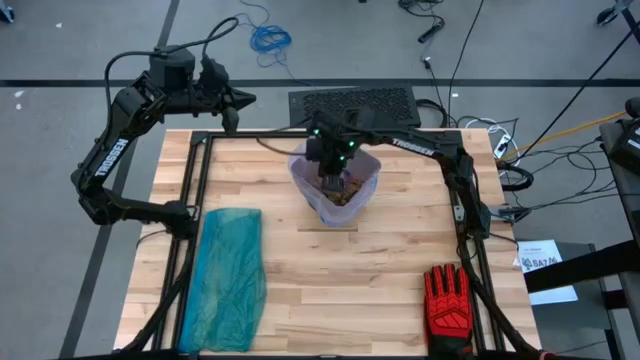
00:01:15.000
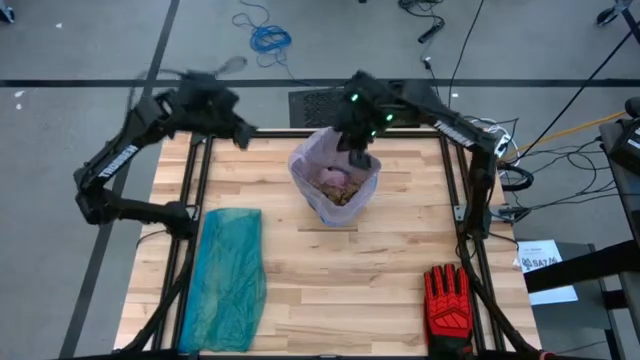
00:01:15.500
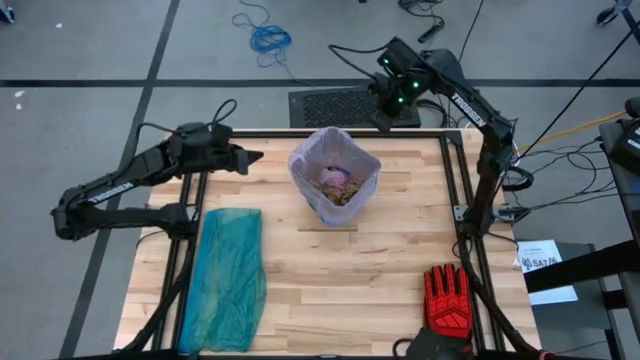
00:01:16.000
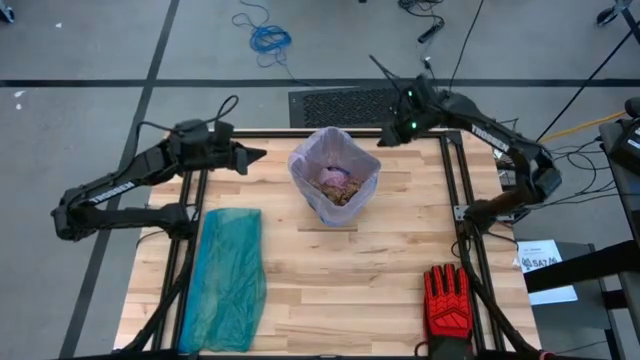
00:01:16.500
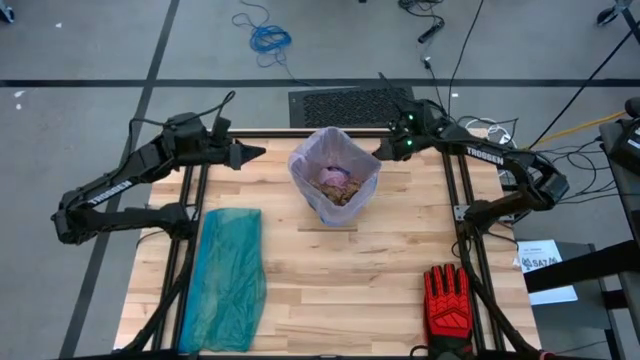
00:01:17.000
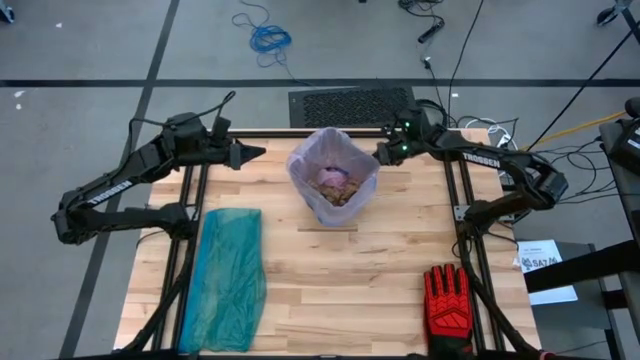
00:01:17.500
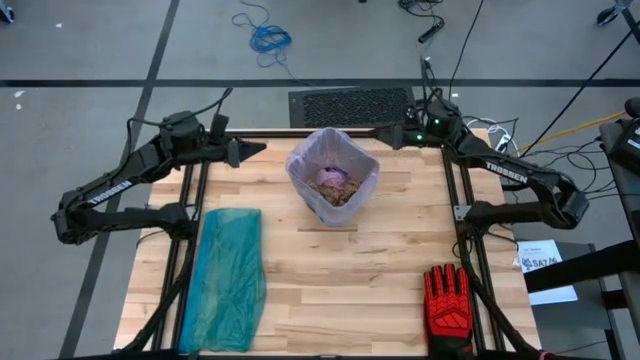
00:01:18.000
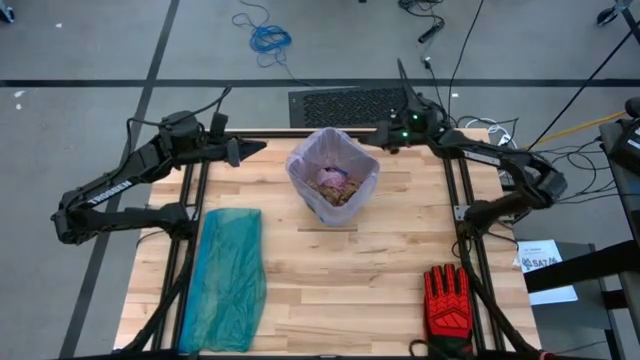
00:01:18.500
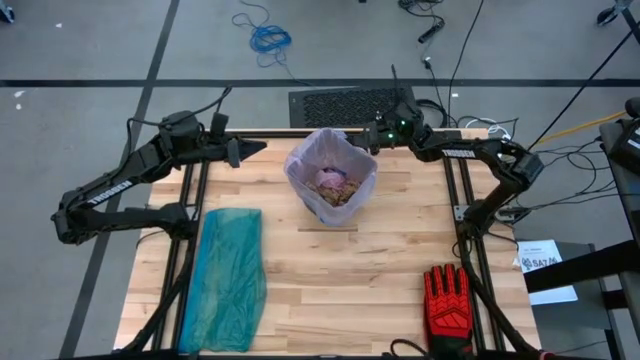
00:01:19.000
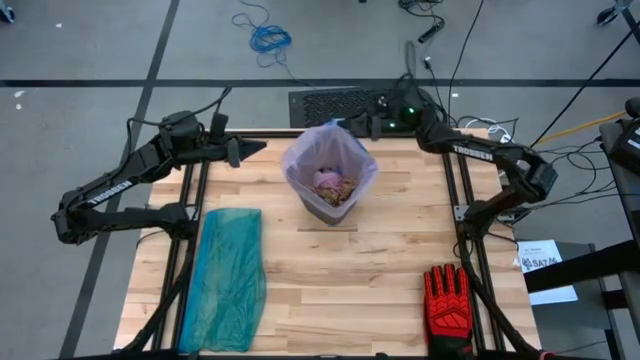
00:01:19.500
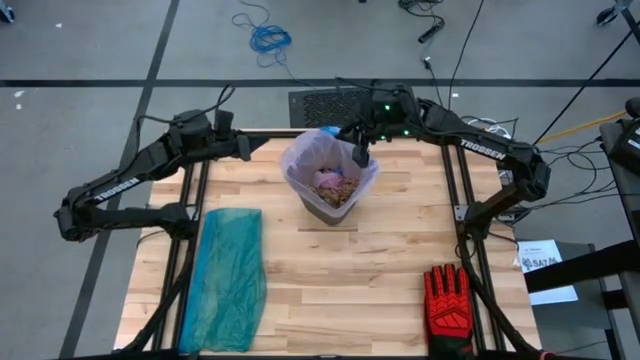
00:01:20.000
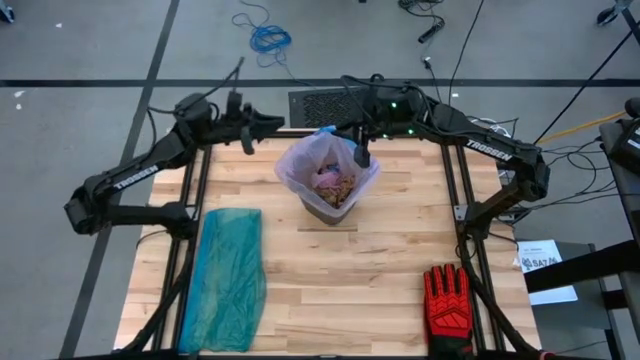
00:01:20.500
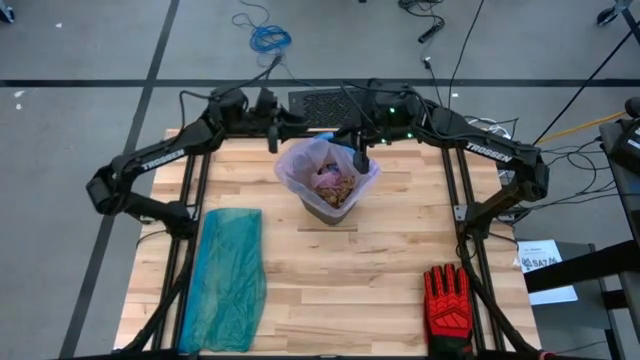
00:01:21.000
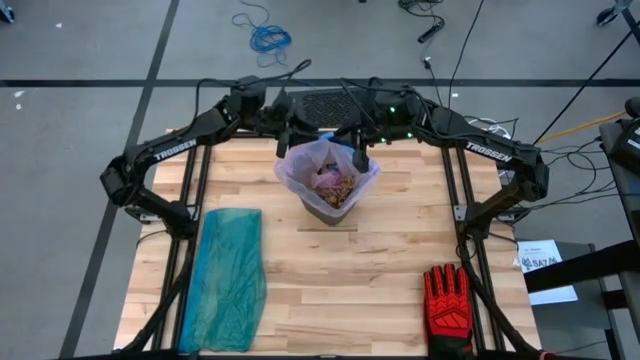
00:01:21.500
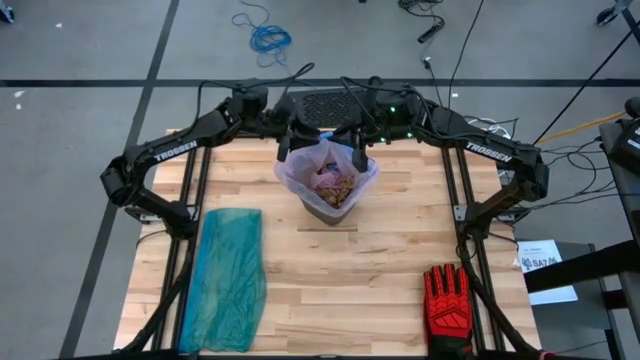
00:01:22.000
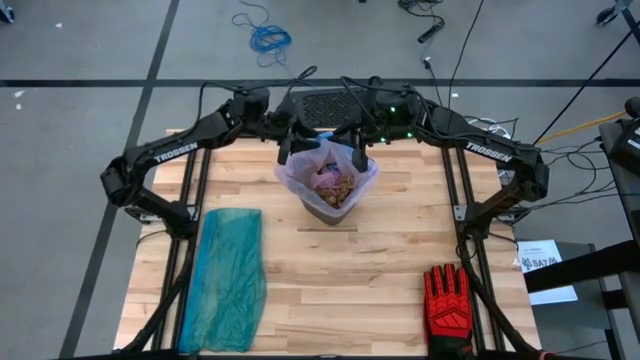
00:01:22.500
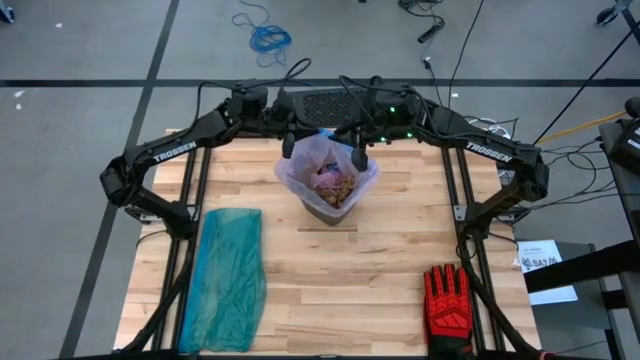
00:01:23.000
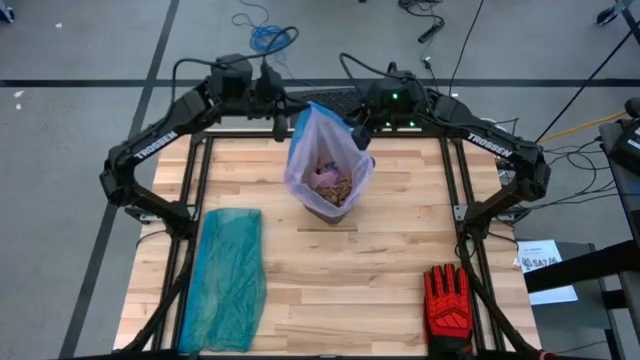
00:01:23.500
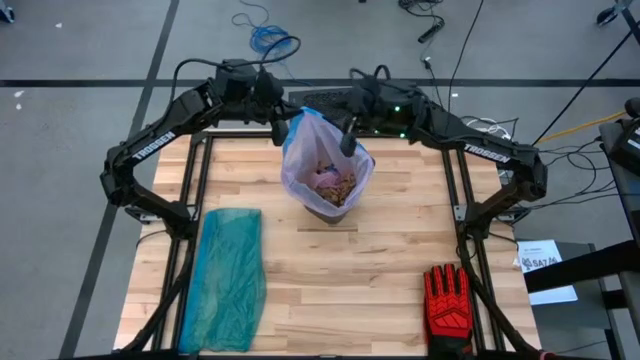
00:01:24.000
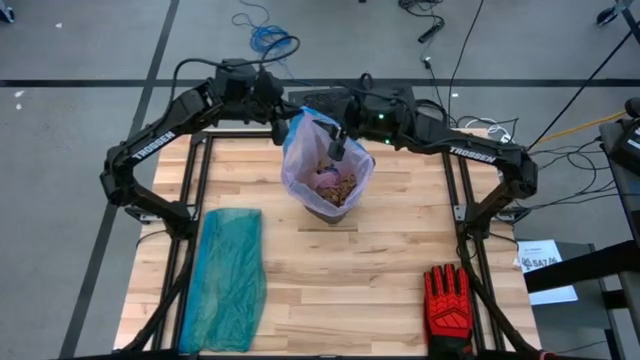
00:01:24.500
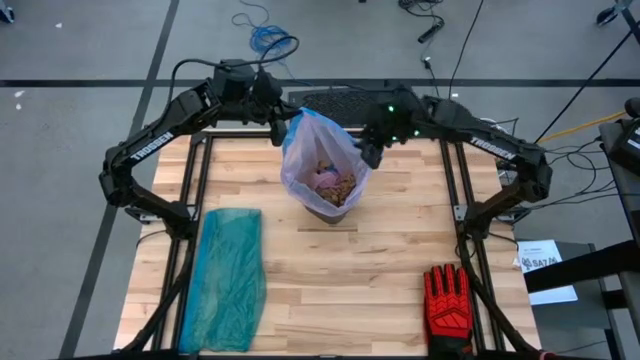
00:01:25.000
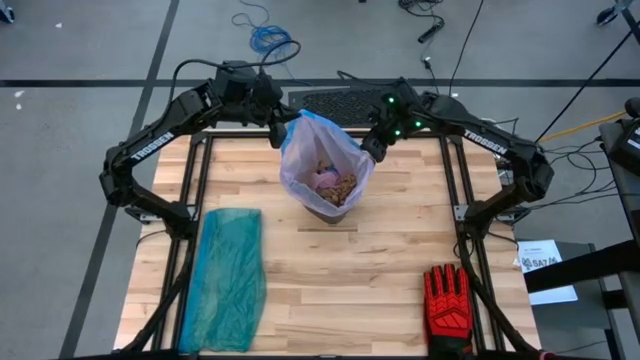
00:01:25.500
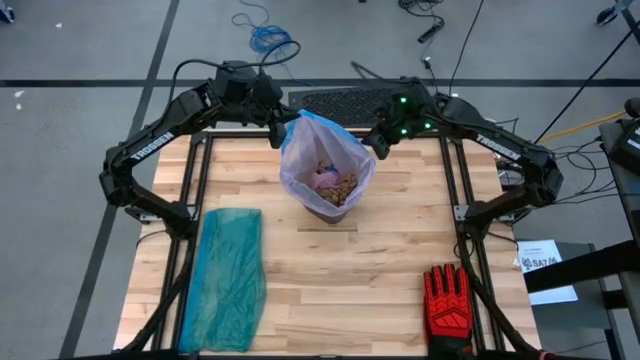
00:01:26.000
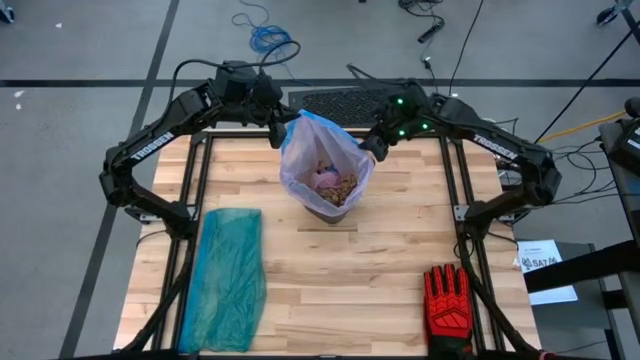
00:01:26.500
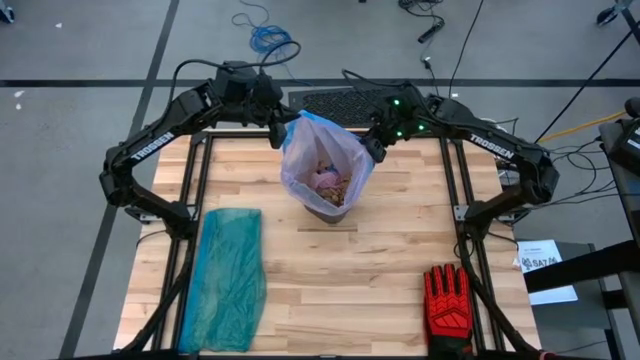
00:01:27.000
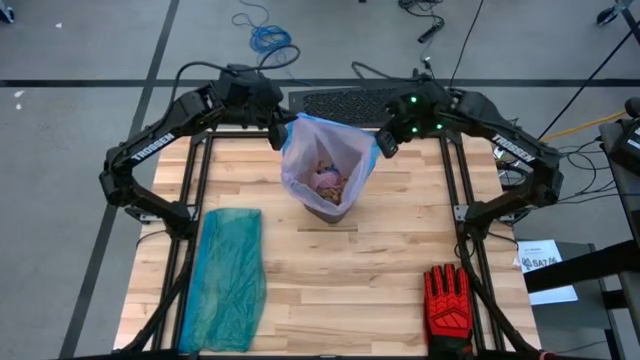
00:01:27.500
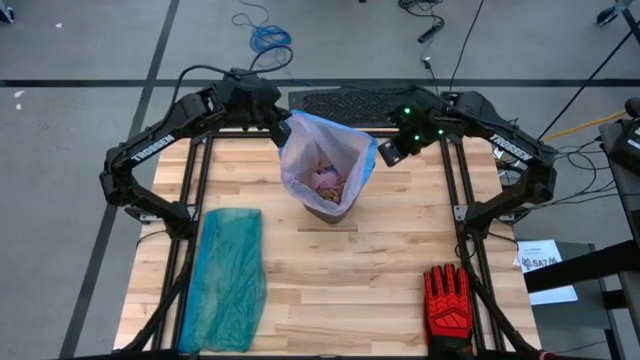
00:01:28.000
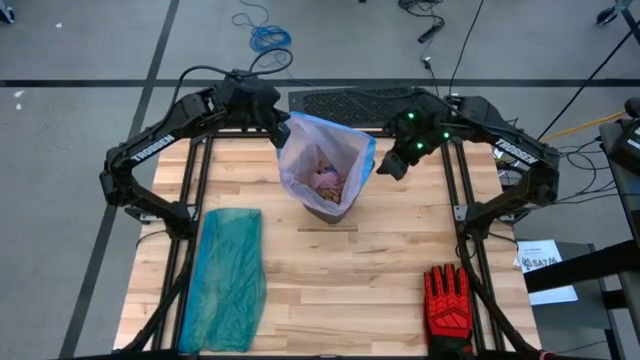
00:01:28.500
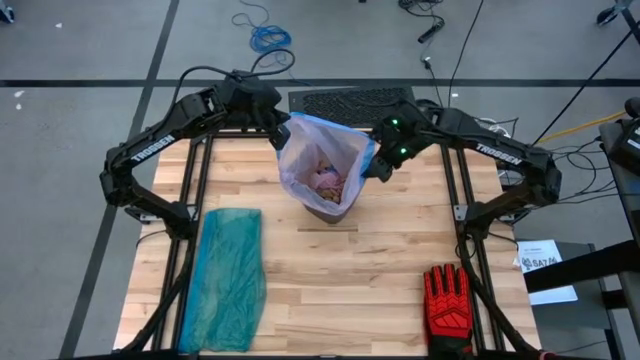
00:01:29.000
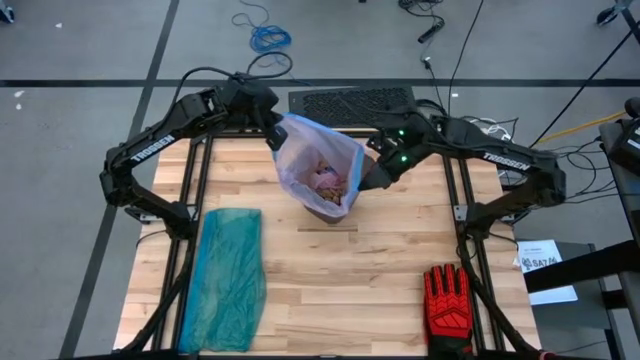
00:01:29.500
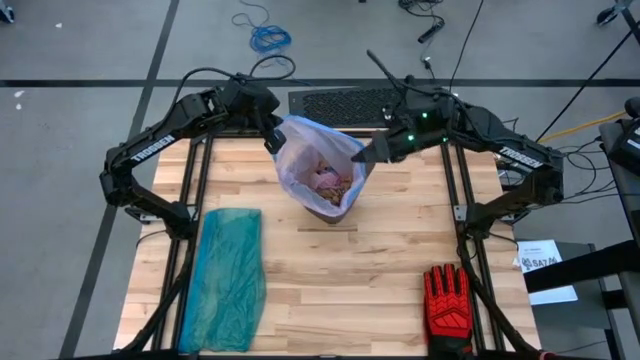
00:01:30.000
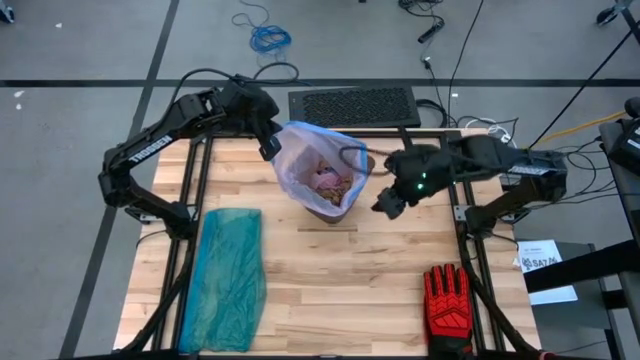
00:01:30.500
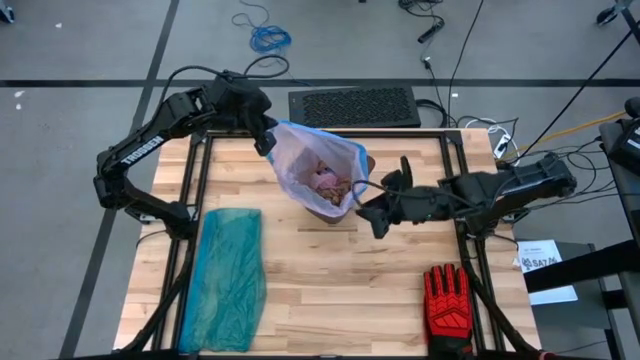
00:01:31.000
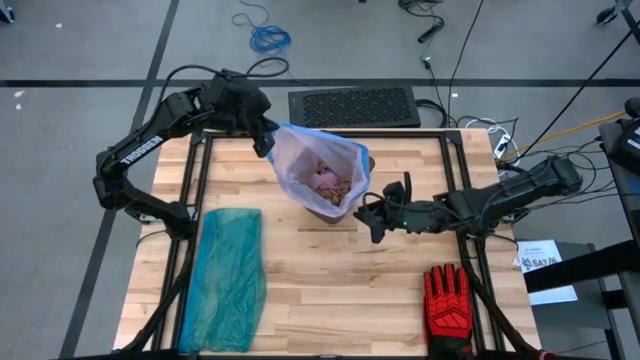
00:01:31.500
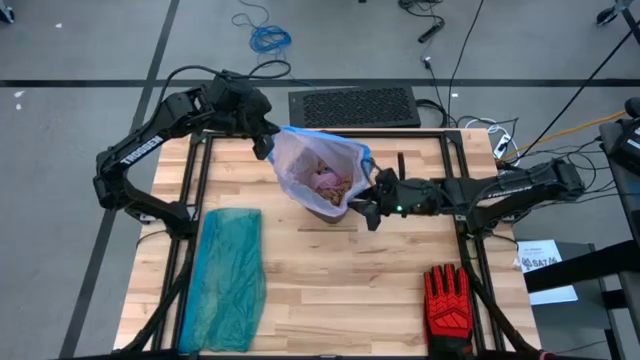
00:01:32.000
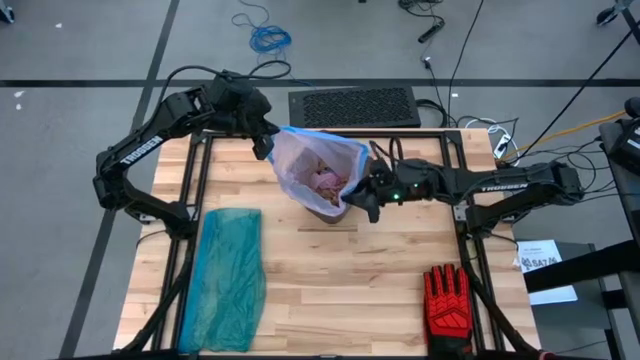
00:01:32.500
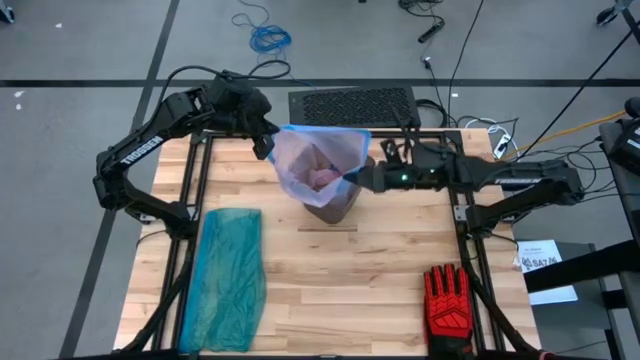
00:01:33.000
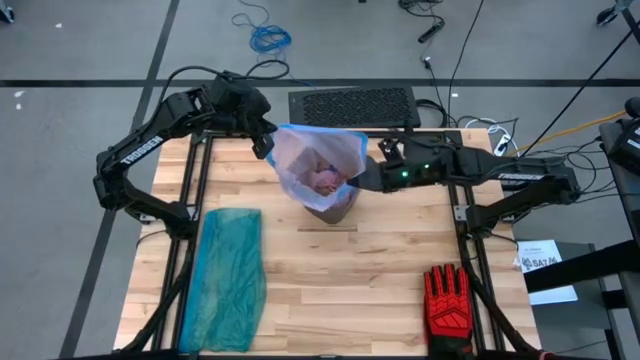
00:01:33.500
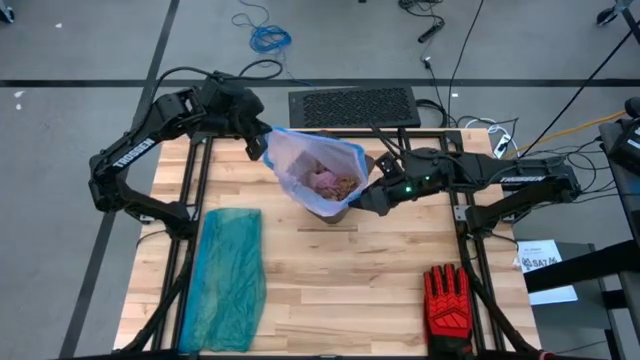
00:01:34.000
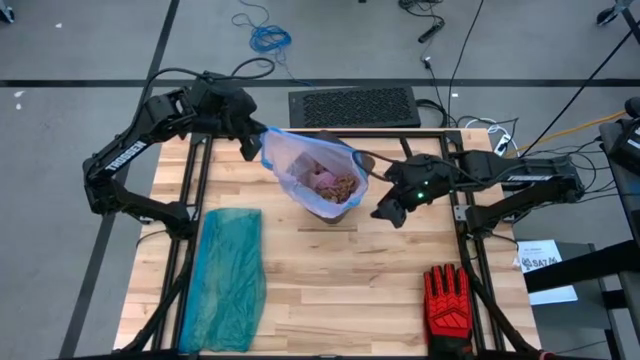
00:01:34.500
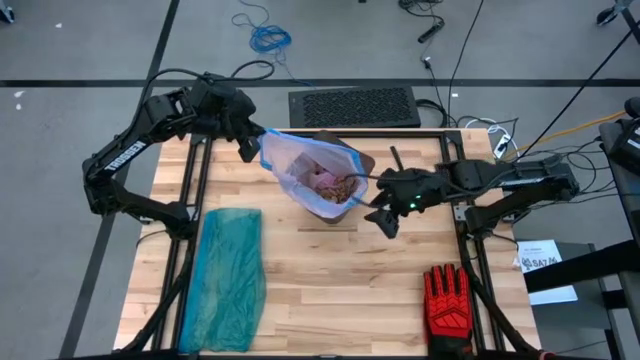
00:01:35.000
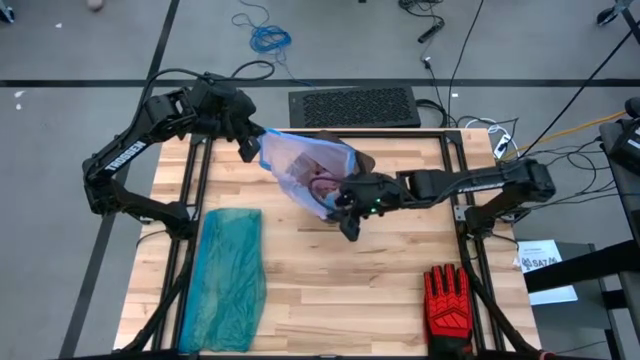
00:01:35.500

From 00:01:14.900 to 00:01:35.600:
Task: place trash/remove bag and relplace
Close the trash bag
